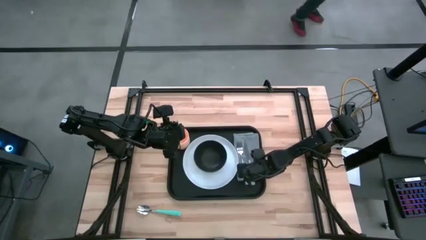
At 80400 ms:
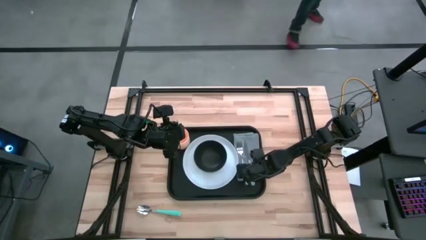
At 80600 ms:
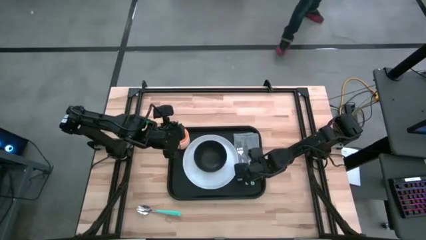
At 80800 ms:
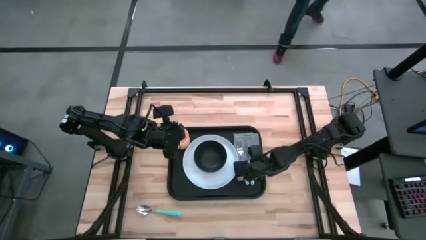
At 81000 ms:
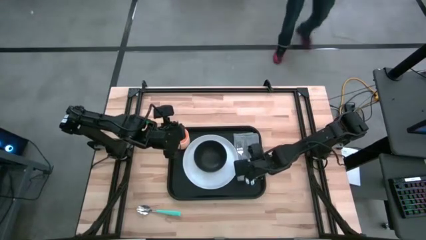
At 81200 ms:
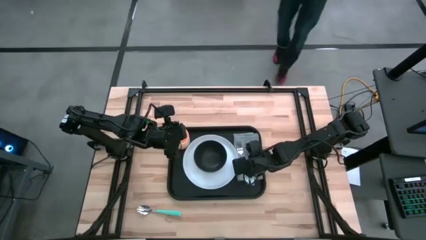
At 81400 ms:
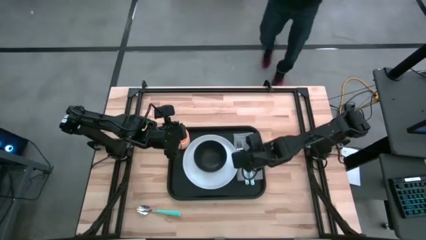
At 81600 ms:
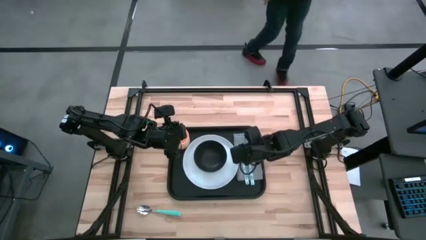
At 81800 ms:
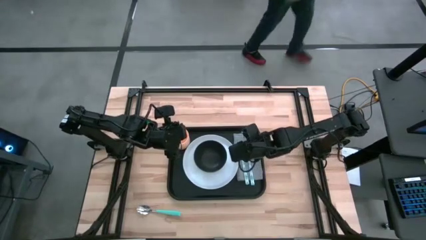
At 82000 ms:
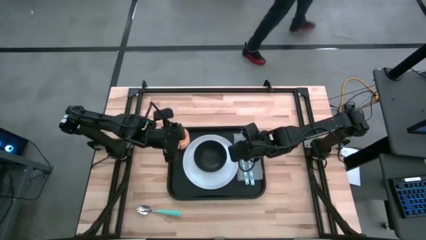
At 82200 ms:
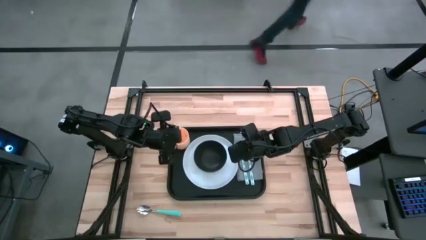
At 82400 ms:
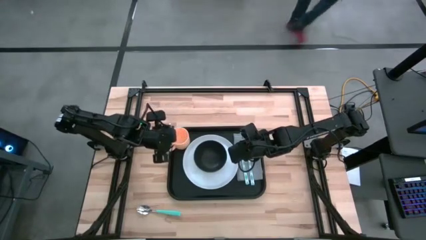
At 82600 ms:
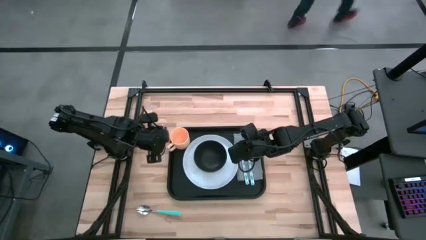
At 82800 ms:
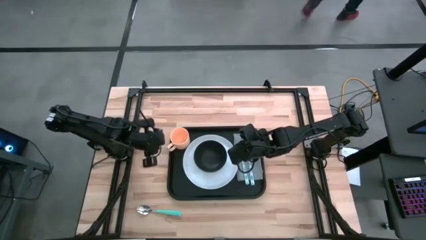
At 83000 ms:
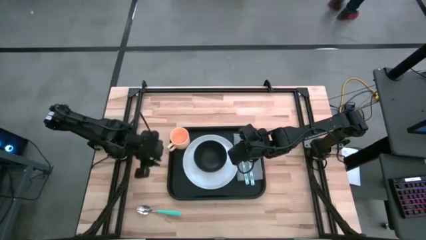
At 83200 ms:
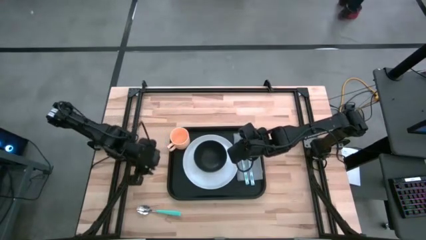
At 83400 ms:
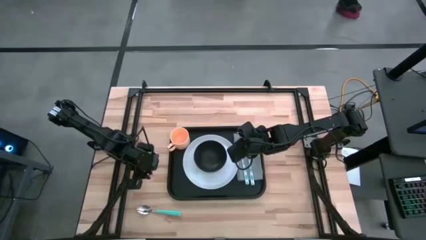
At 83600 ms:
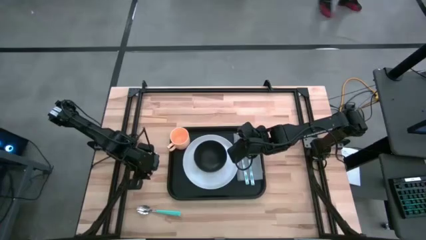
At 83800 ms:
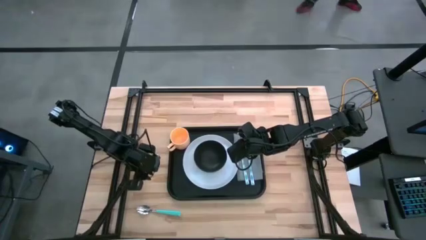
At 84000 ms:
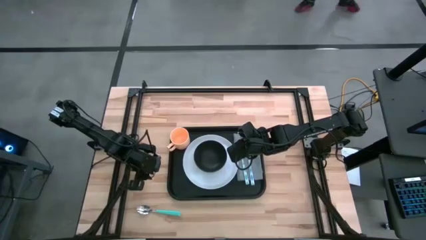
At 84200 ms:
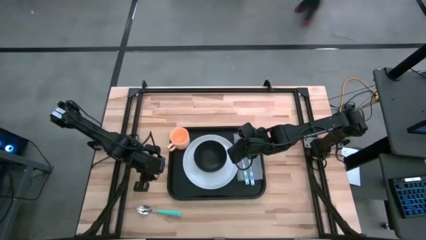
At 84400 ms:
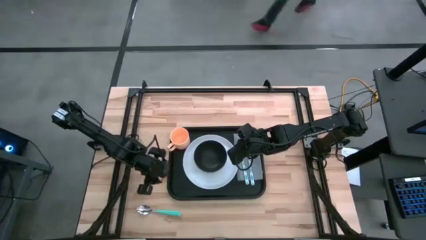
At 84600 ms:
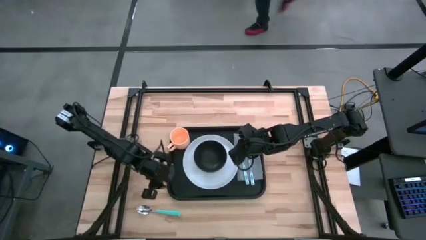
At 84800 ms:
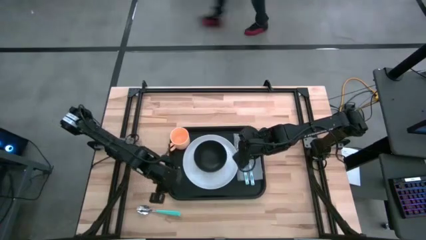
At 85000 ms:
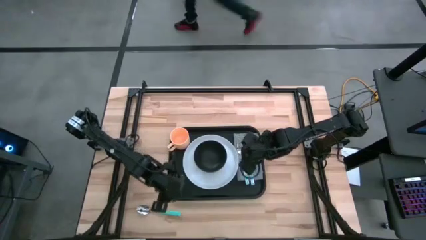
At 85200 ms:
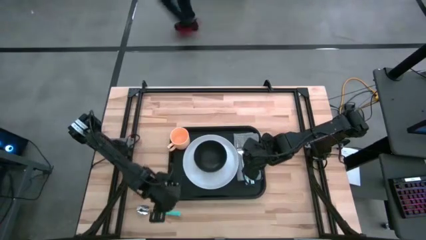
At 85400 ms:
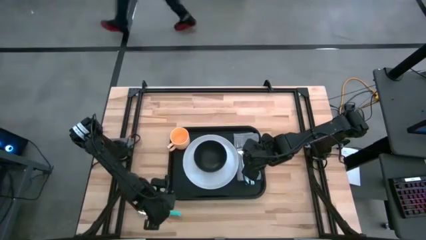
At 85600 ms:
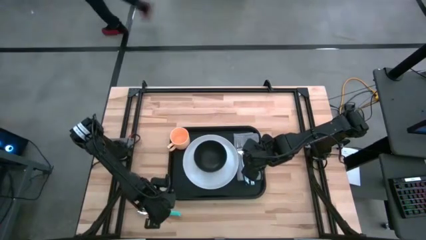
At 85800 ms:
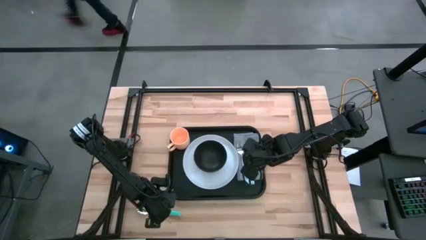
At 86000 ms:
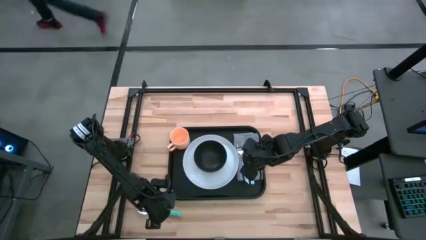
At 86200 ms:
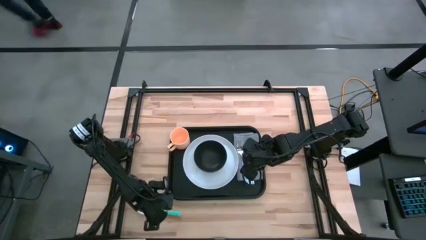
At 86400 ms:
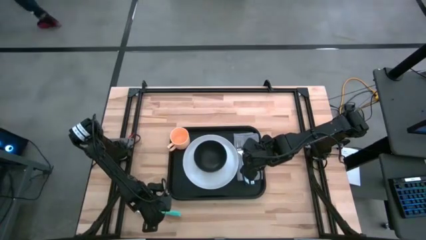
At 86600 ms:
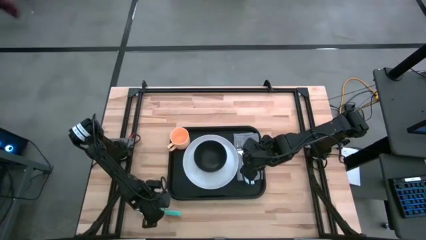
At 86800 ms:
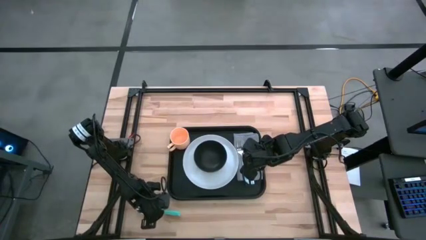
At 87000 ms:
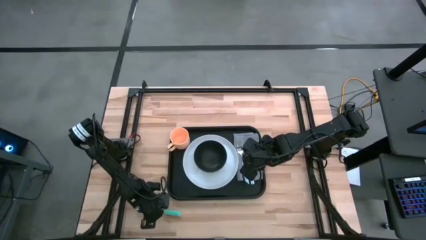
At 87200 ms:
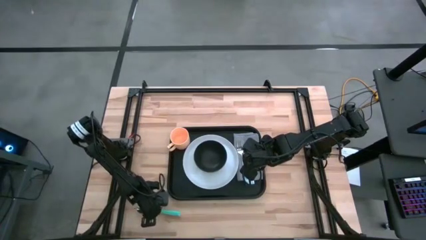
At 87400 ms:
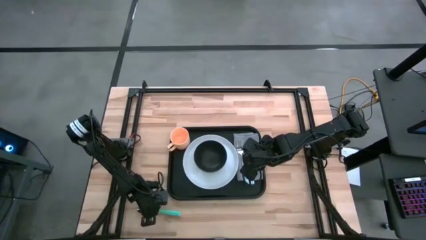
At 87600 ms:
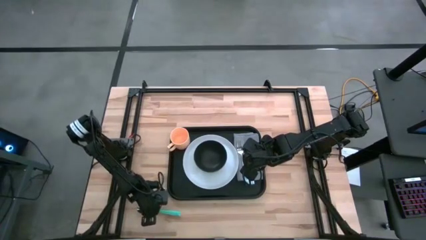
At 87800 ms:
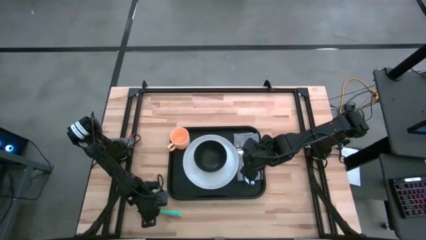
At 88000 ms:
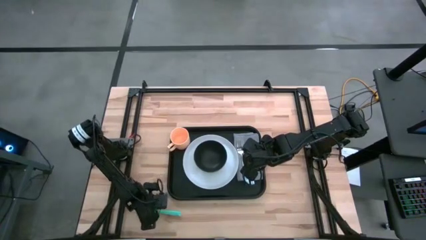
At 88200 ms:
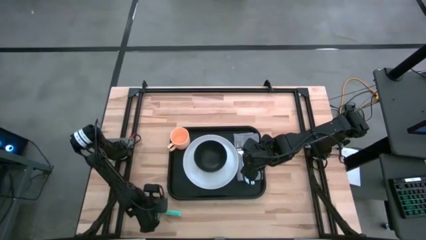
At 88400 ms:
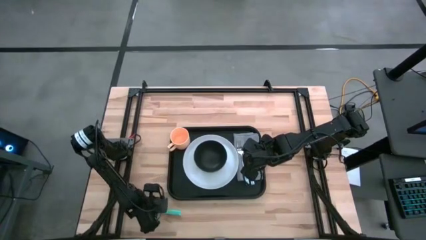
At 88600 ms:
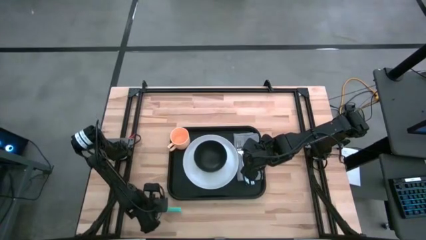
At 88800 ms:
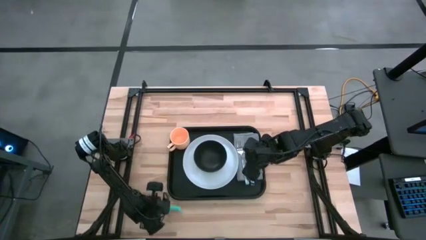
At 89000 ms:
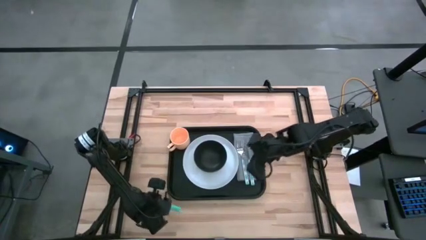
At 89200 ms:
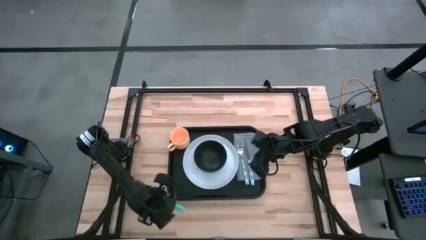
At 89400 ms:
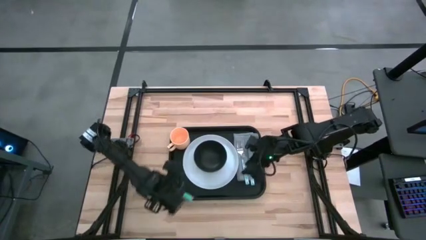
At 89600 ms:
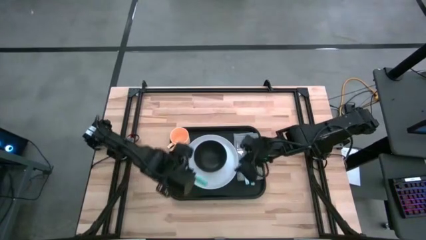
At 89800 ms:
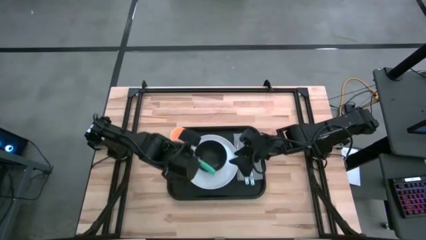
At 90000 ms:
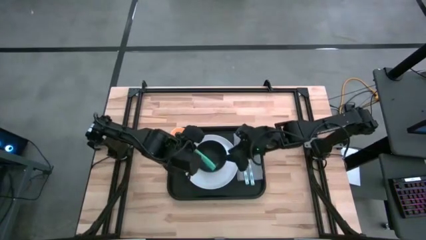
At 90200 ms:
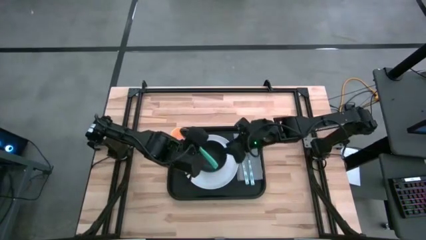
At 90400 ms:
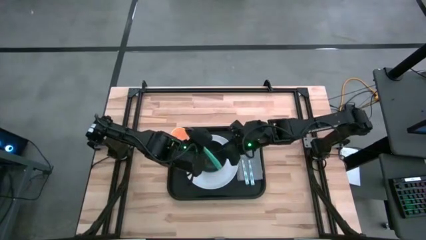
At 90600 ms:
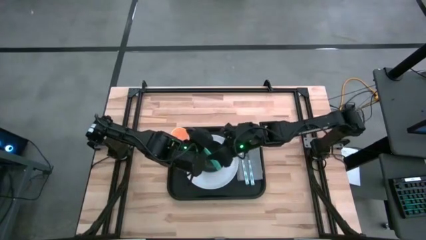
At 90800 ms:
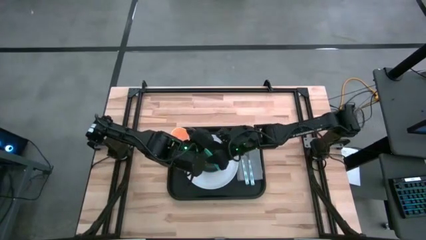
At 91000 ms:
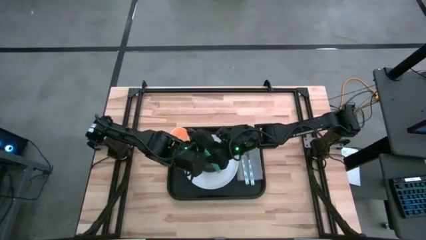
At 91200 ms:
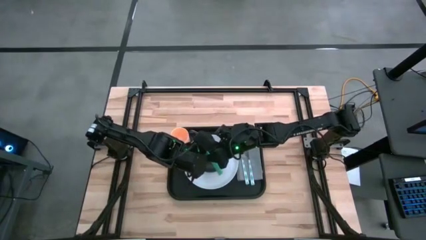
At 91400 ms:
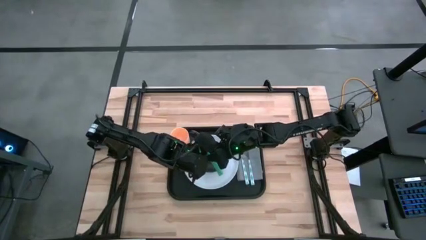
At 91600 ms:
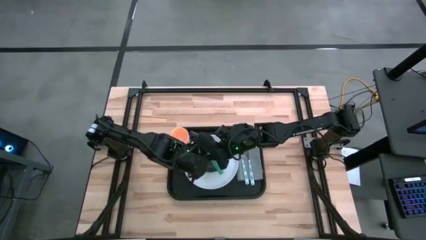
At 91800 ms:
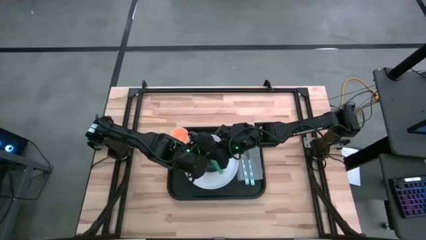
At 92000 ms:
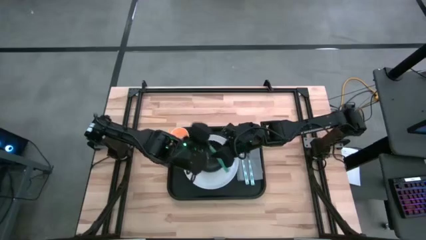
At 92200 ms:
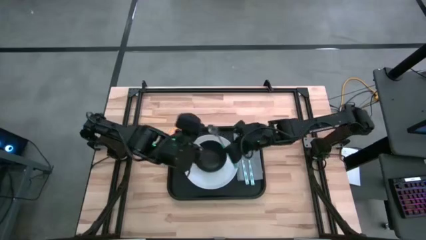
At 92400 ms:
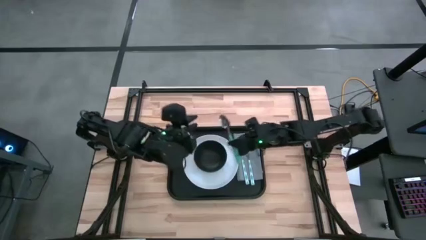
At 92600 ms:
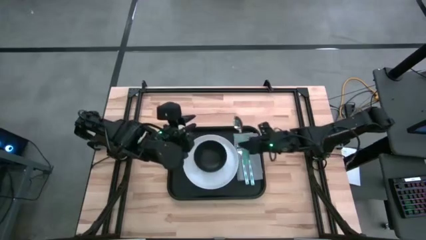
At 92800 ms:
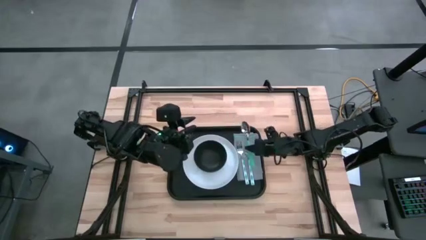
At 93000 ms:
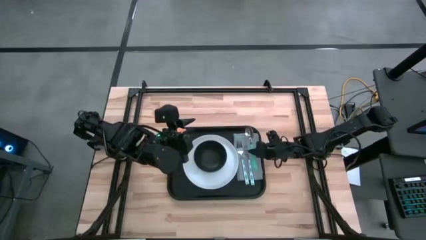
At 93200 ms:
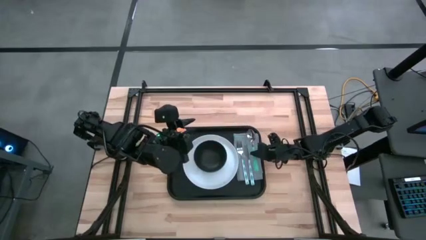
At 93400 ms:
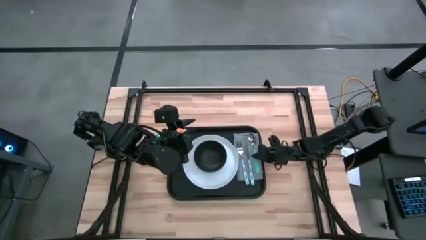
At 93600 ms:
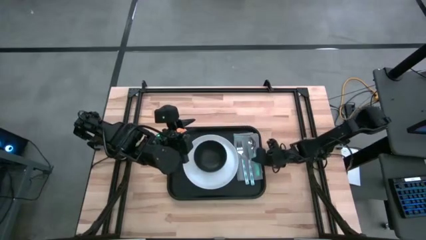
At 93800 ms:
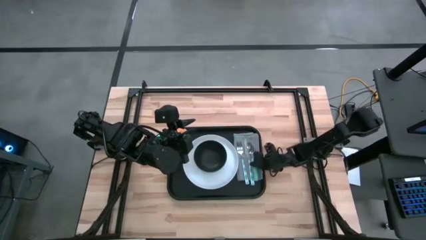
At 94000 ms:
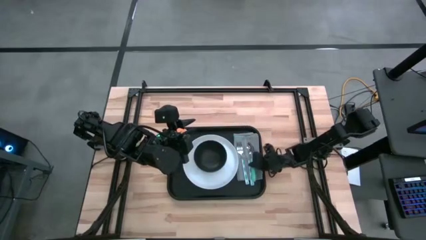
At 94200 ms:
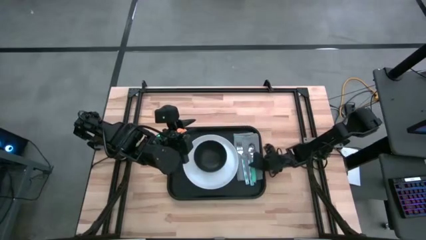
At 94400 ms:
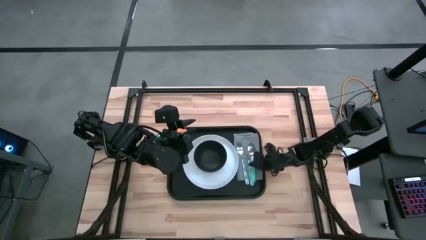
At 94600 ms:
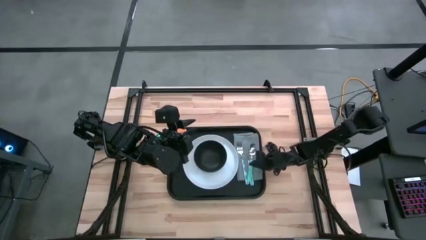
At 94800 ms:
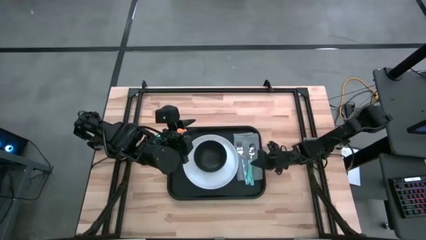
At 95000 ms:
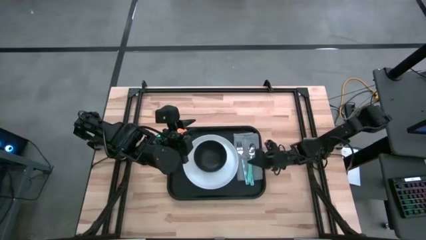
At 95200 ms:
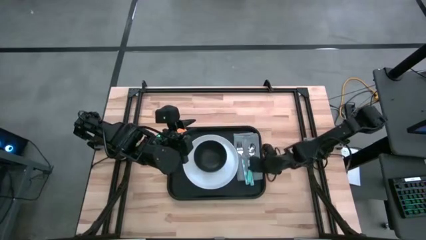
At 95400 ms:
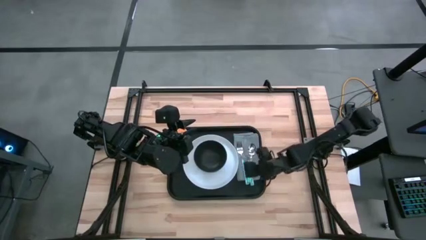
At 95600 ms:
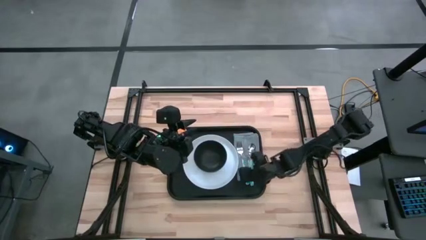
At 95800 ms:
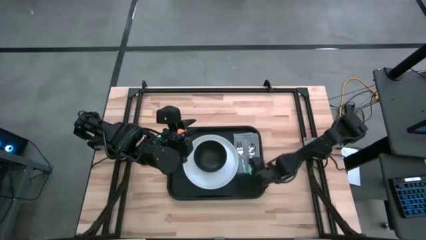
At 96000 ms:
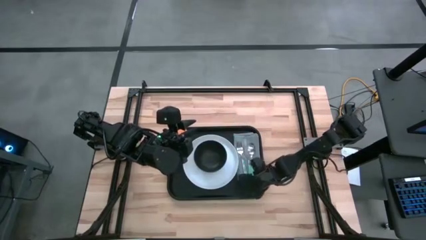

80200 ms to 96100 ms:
Task: Set up tray
Put the green spoon on the gray table napkin to the right of the white blue table knife

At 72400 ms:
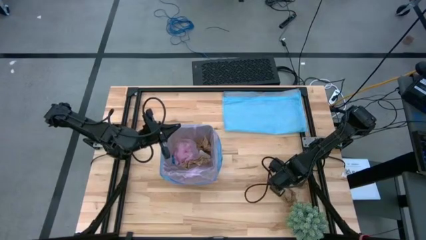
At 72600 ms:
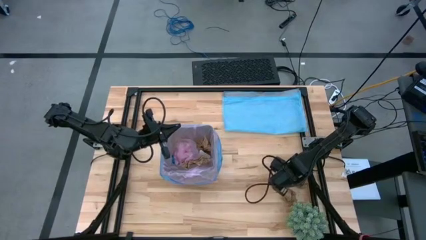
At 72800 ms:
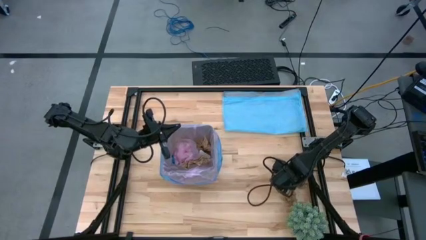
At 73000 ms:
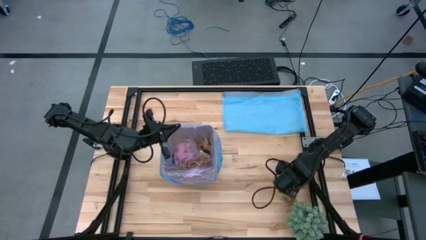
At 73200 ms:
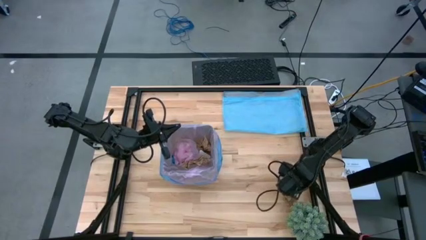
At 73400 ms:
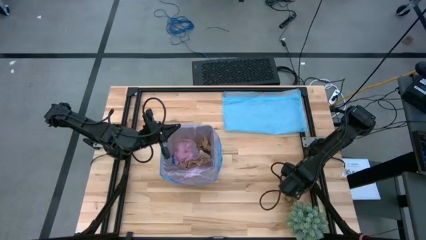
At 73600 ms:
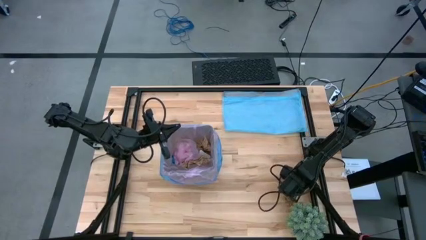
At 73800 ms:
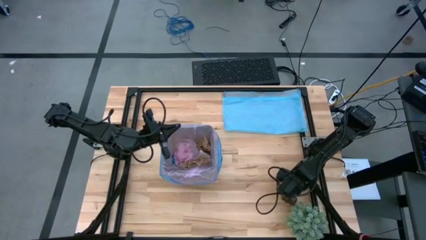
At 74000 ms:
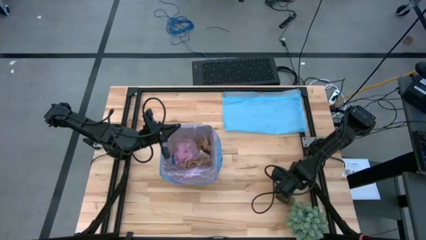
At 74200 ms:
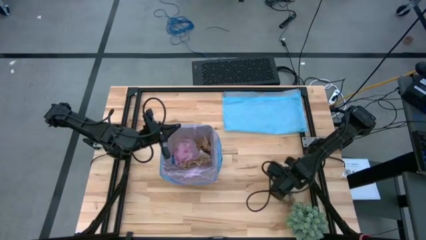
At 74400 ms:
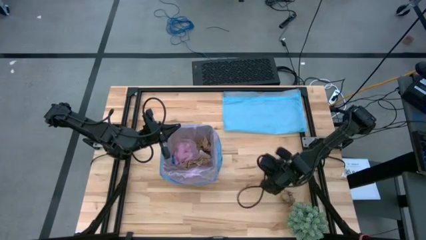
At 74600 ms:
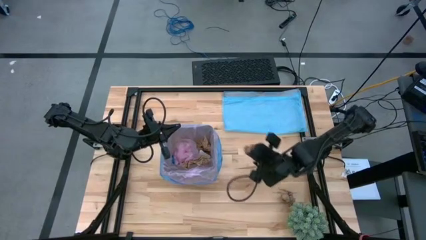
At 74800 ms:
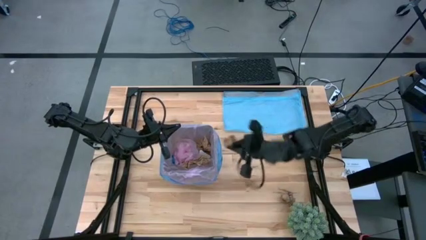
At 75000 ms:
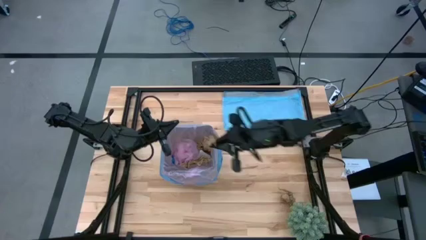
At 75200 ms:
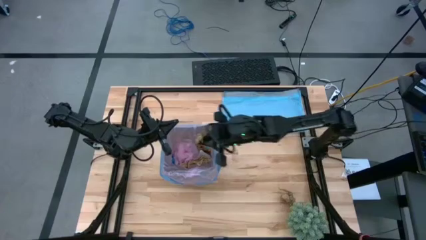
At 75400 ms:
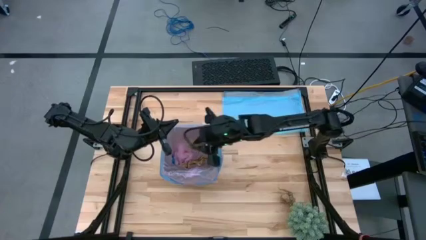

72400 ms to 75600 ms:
Task: place trash/remove bag and relplace
Put the brown napkin into the trash bin
